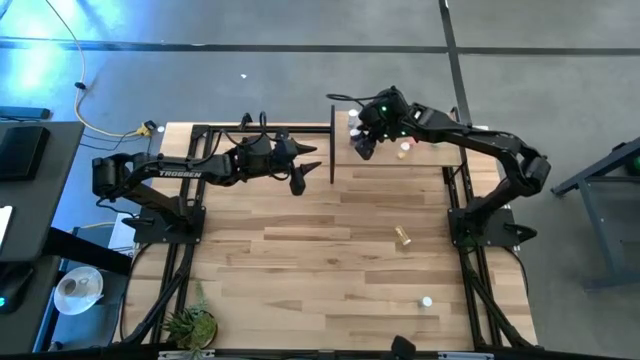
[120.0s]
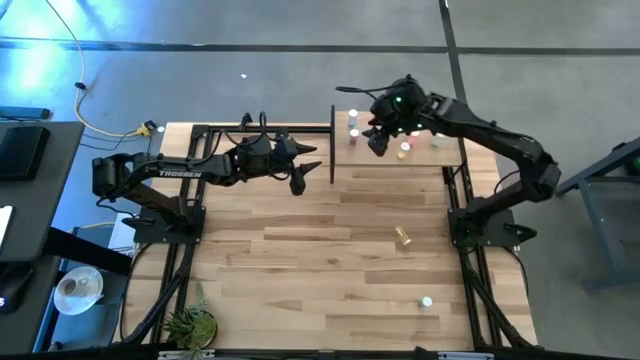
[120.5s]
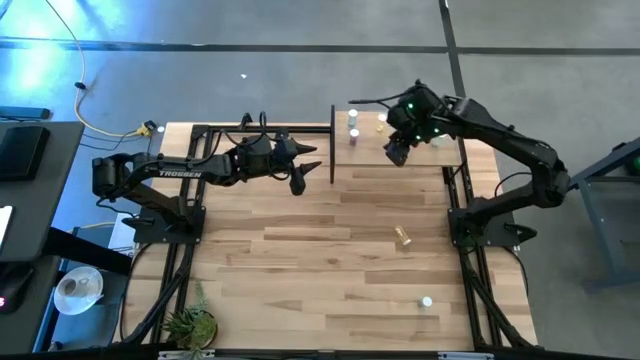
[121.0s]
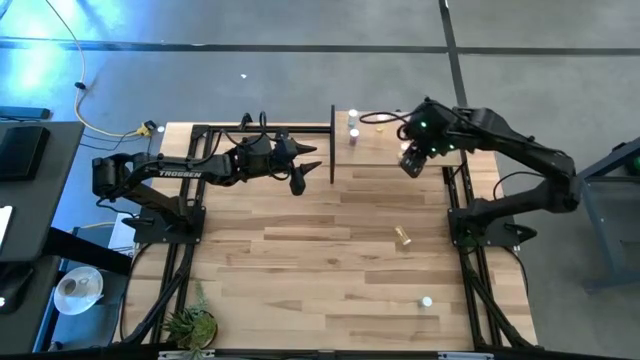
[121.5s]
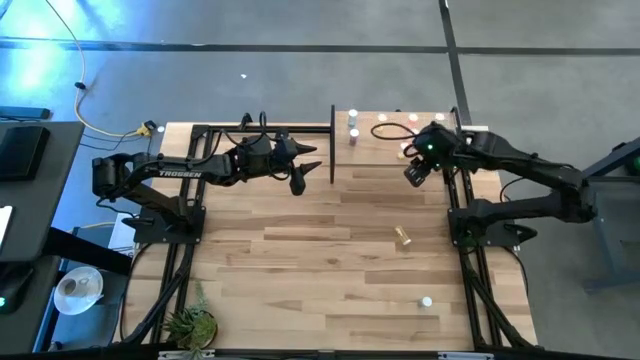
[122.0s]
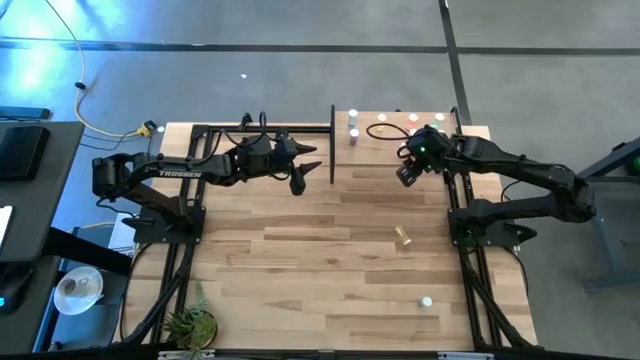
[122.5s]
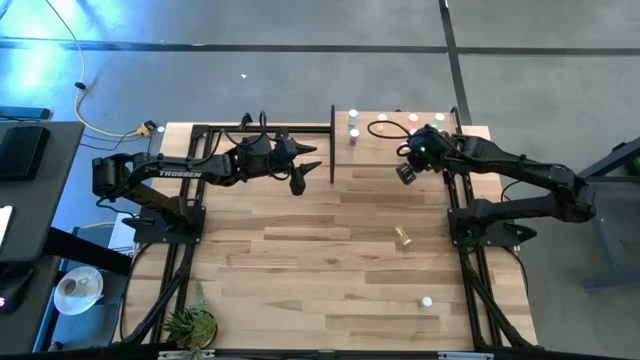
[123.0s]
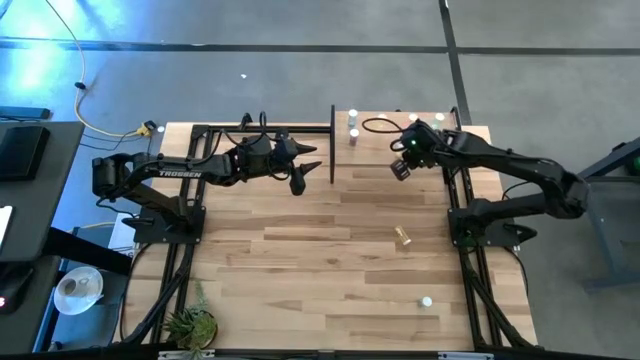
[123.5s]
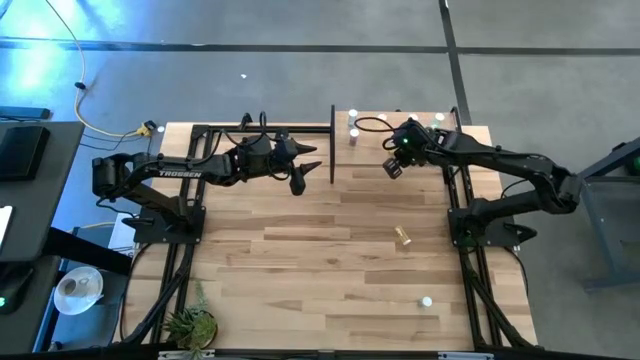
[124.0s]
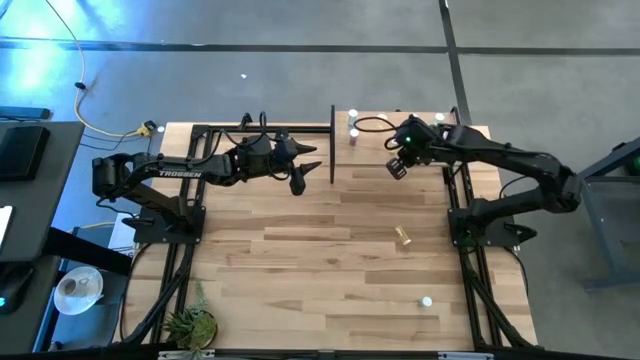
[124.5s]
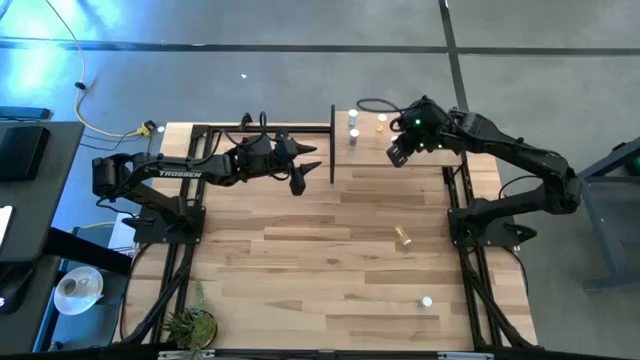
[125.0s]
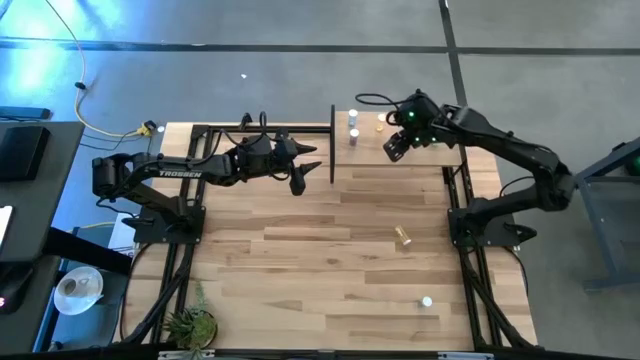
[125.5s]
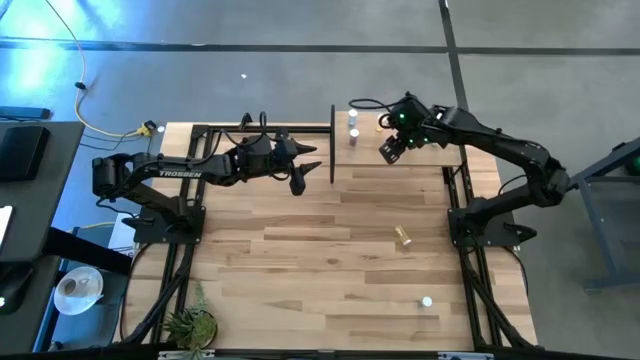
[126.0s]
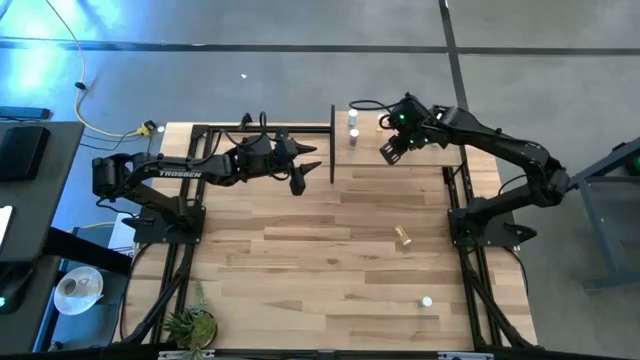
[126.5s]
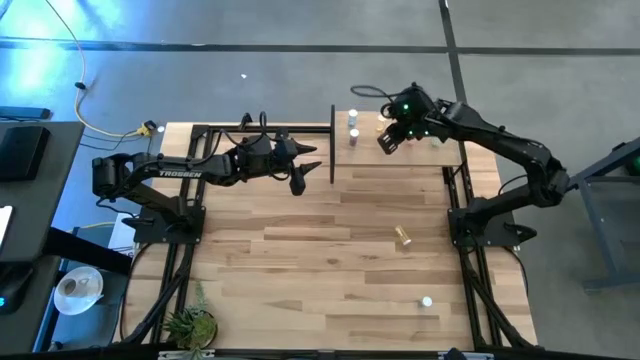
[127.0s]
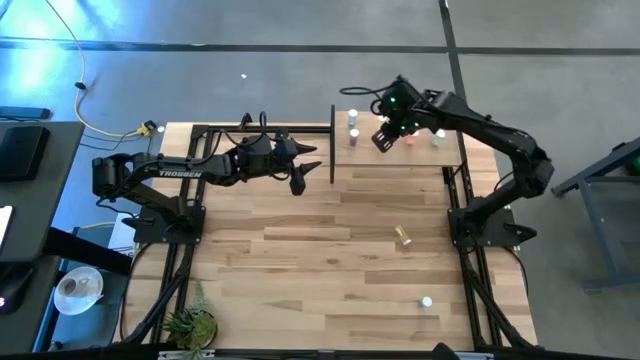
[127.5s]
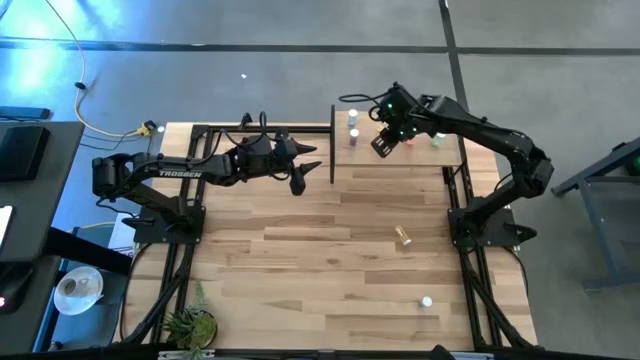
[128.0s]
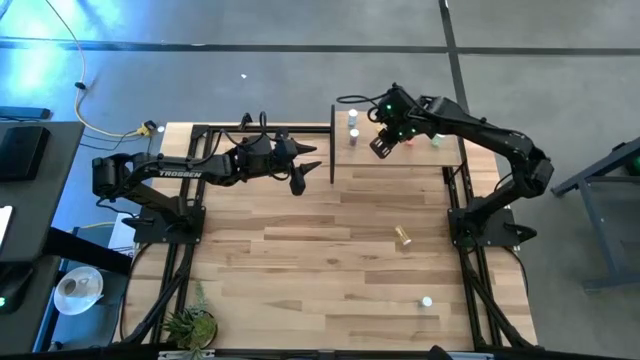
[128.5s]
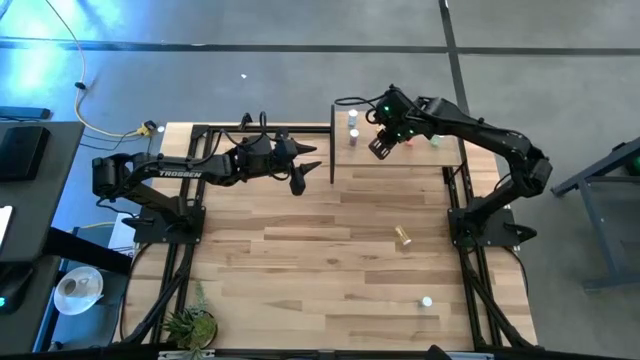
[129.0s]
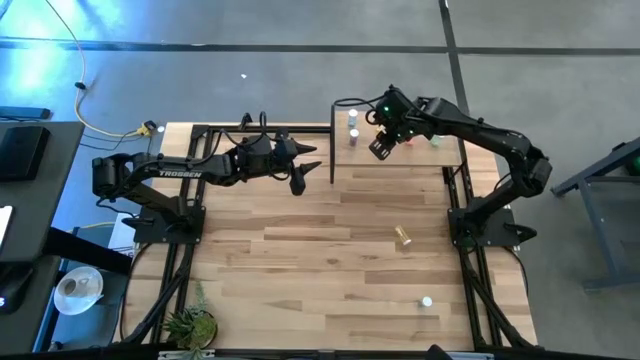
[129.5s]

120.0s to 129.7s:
Task: Pick and place medicine bottles onto shelf by color
Adjust the yellow medicine bottle on the shelf

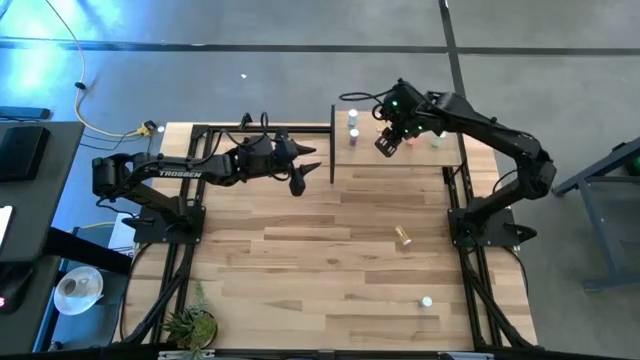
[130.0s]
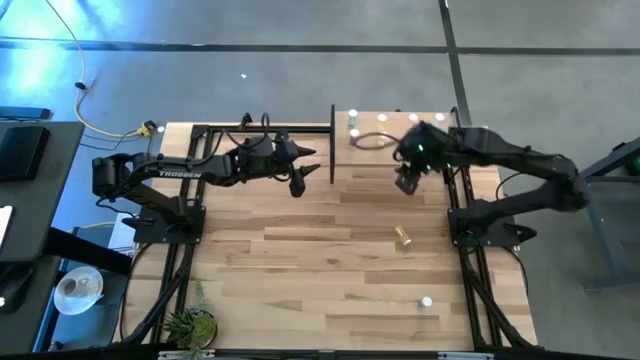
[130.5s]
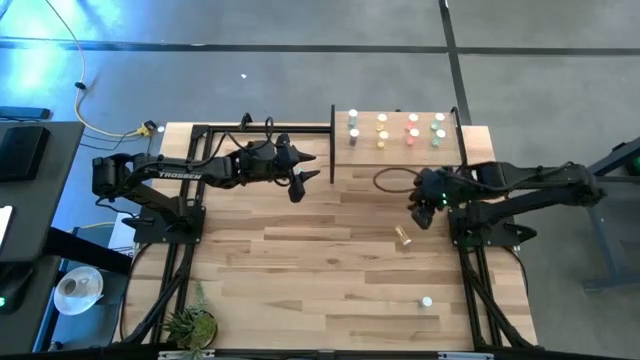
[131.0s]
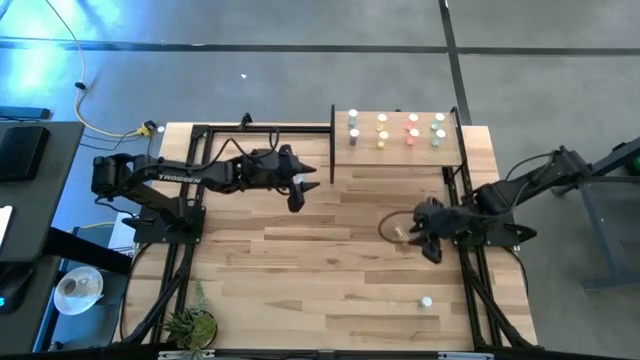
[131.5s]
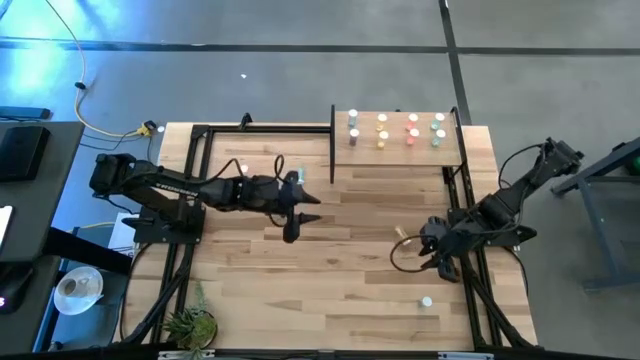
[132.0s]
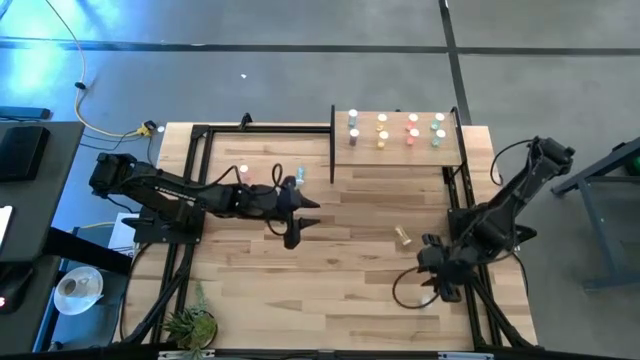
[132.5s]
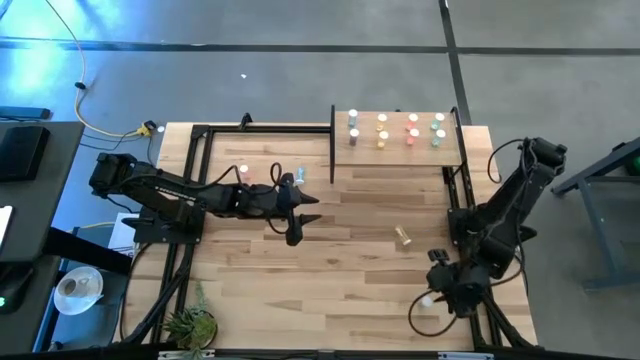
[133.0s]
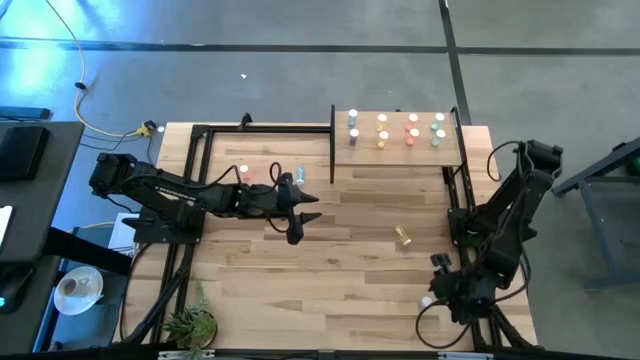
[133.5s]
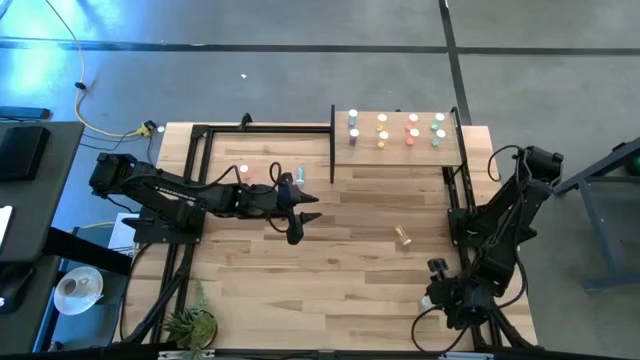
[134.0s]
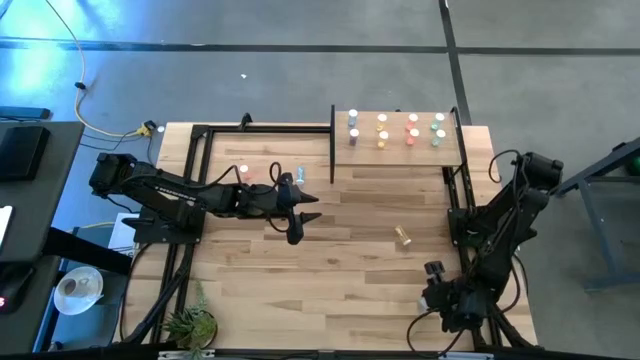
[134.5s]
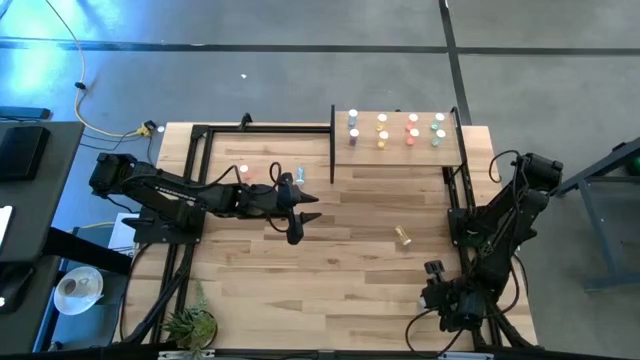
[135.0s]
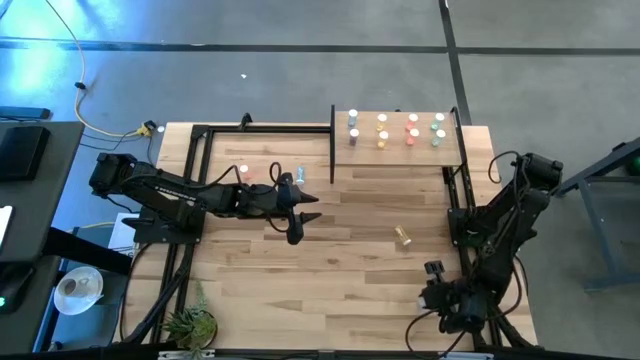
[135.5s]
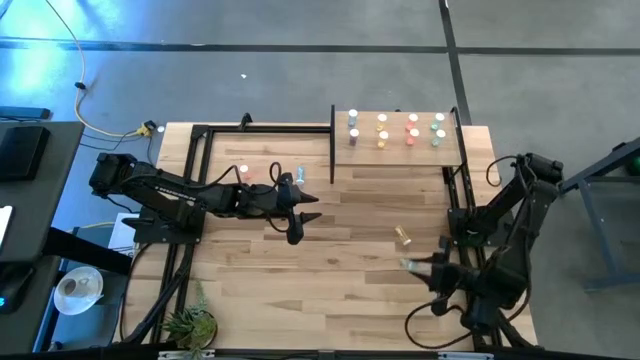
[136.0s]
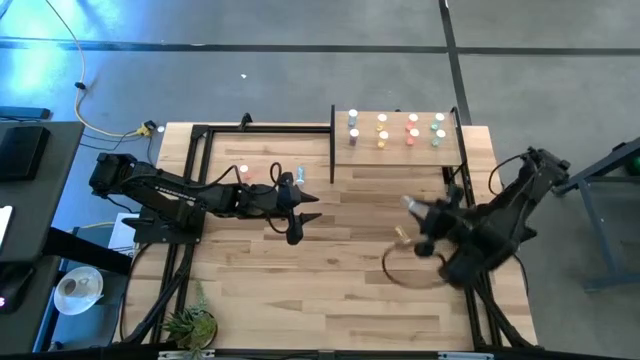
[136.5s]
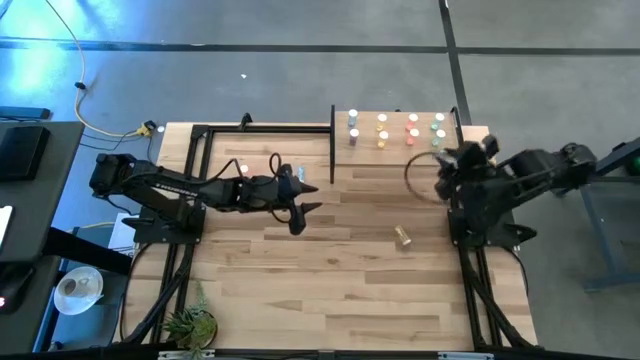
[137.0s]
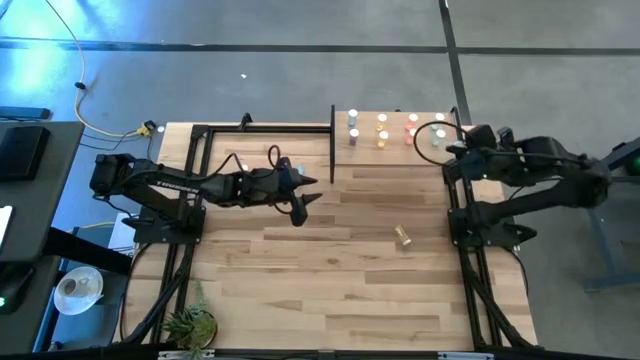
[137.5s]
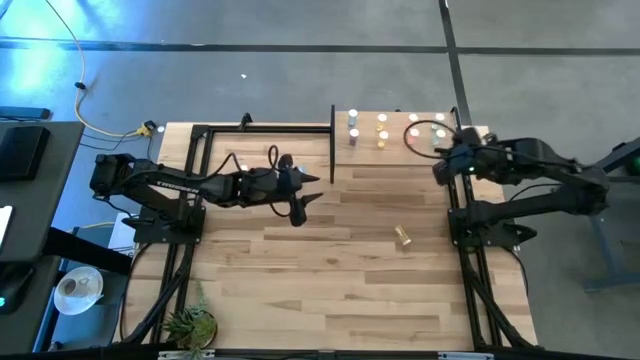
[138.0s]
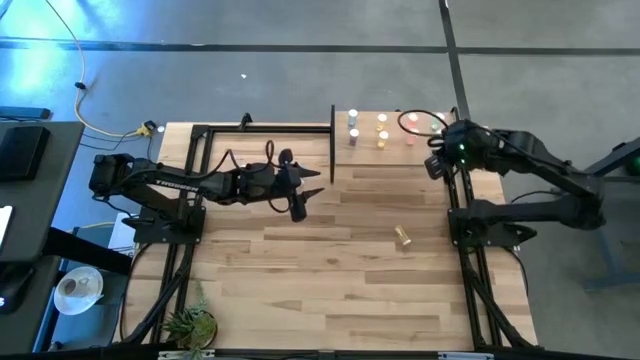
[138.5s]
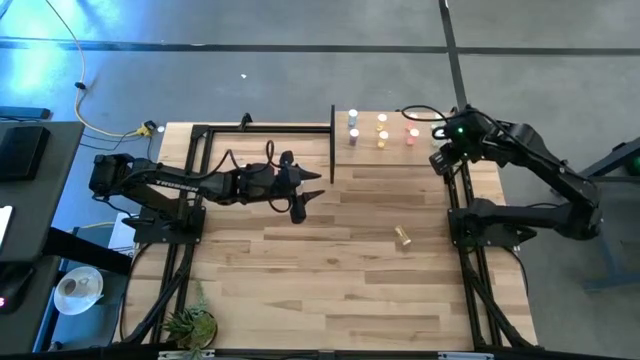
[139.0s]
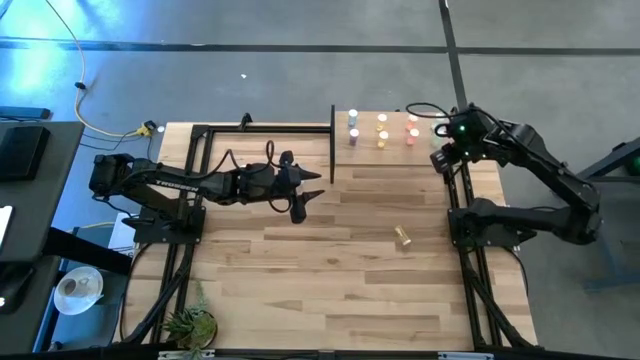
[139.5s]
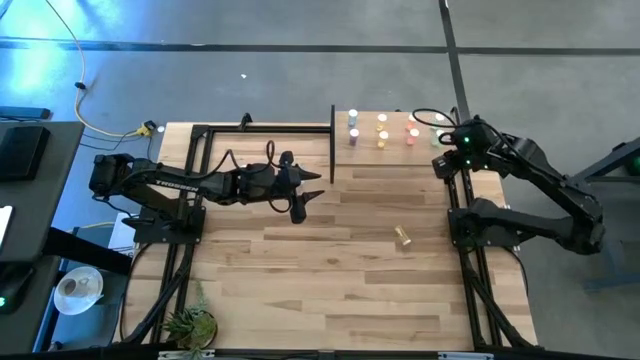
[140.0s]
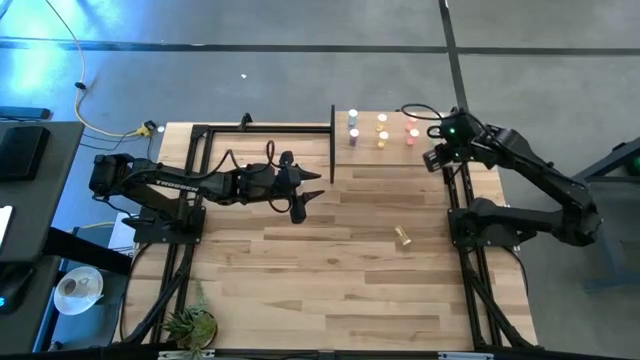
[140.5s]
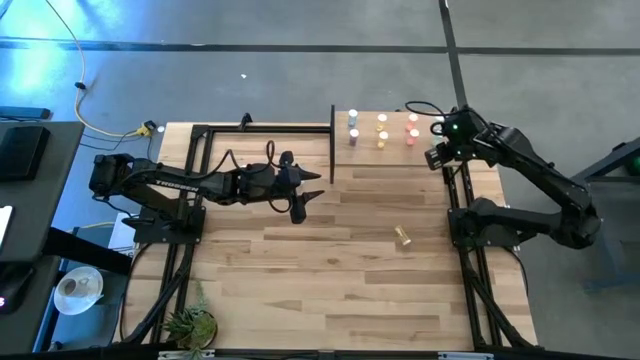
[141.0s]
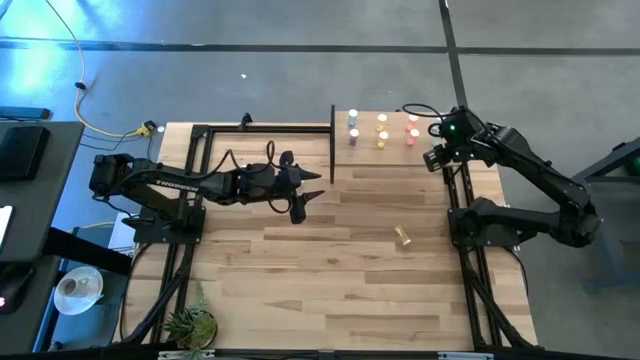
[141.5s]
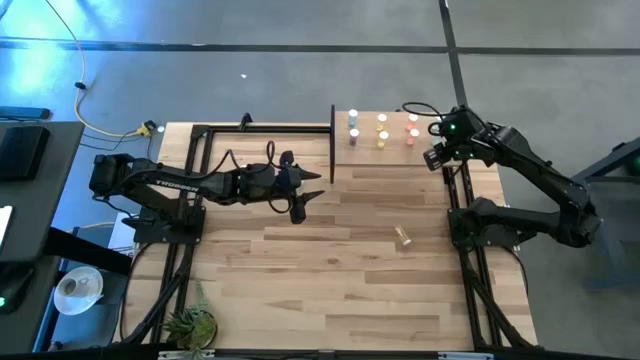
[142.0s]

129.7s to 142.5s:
Put the light blue medicine bottle aligned with the other light blue medicine bottle on the shelf

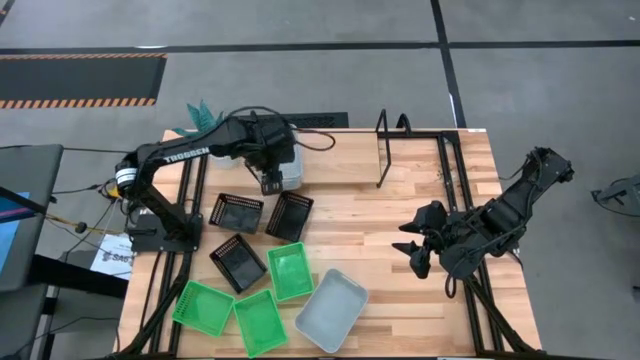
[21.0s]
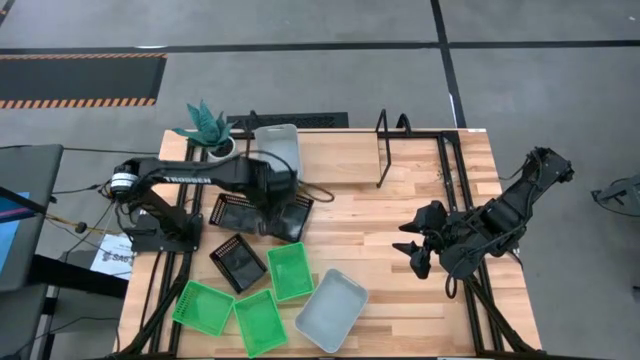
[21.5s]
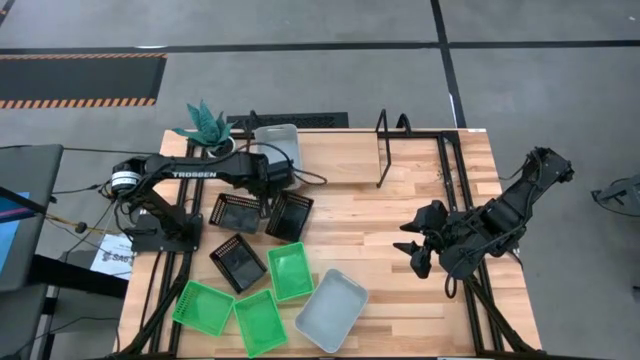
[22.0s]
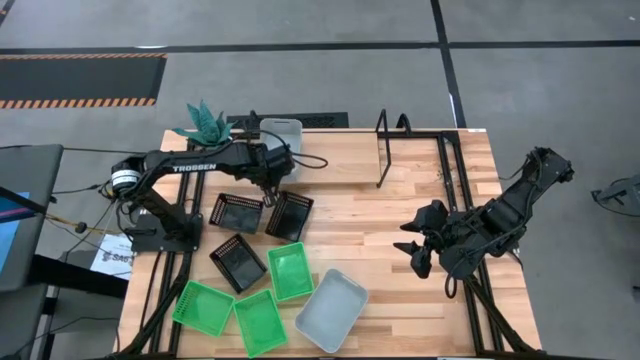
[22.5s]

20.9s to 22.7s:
Task: Stack baskets on shelf by color
Adjust the stacked gray bins on the shelf
